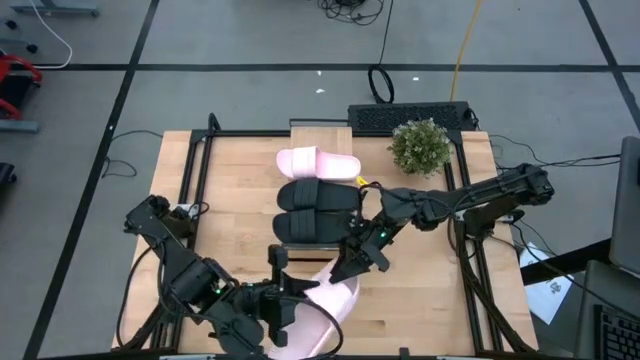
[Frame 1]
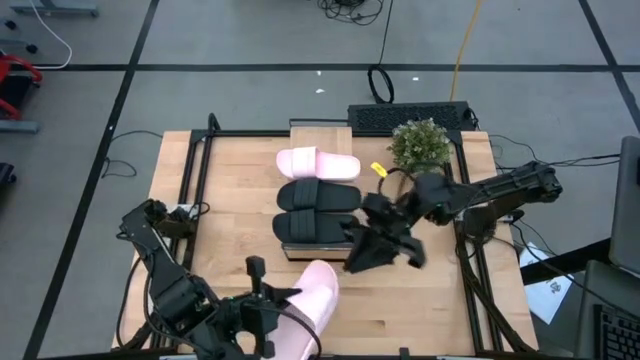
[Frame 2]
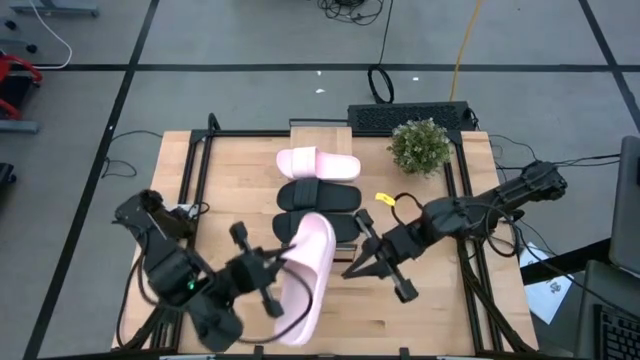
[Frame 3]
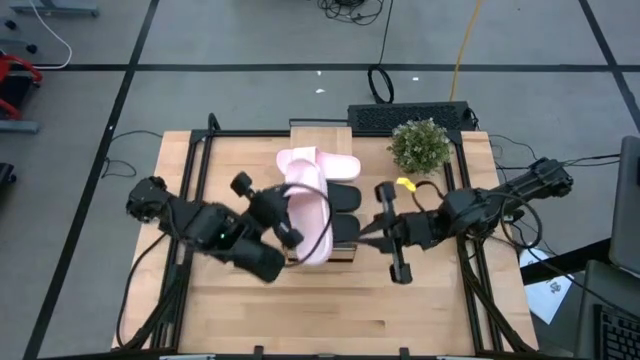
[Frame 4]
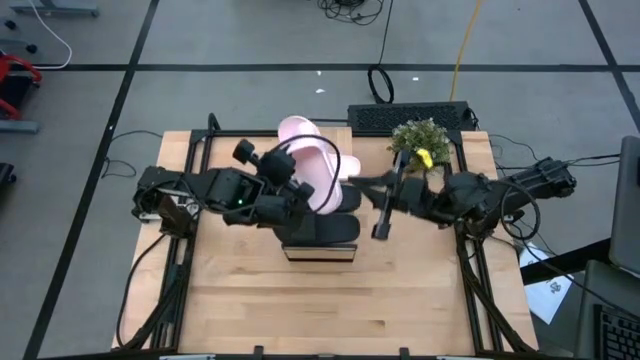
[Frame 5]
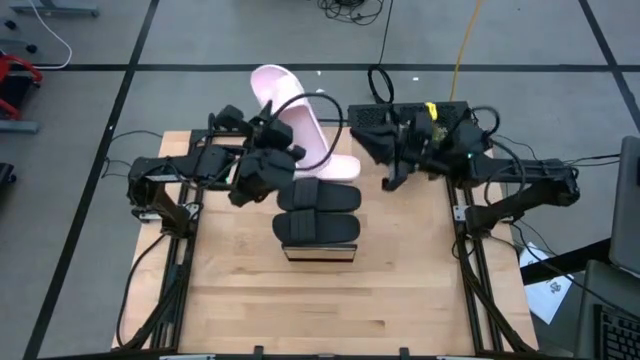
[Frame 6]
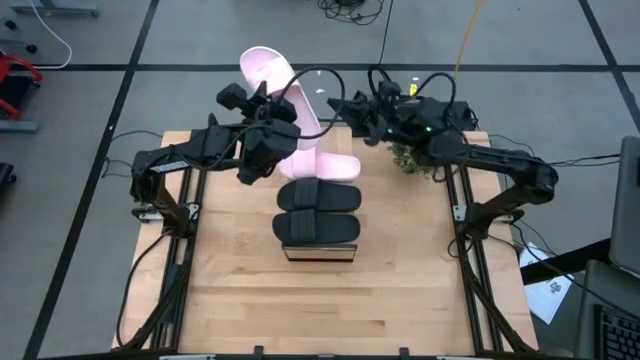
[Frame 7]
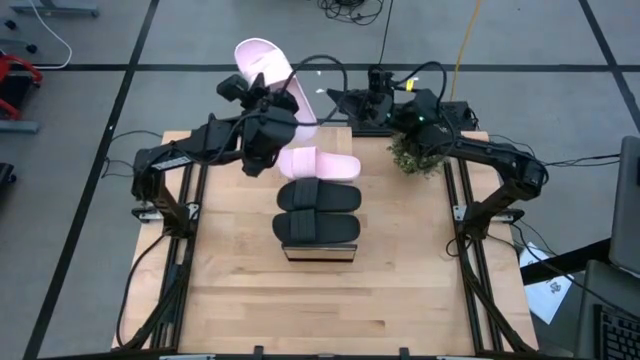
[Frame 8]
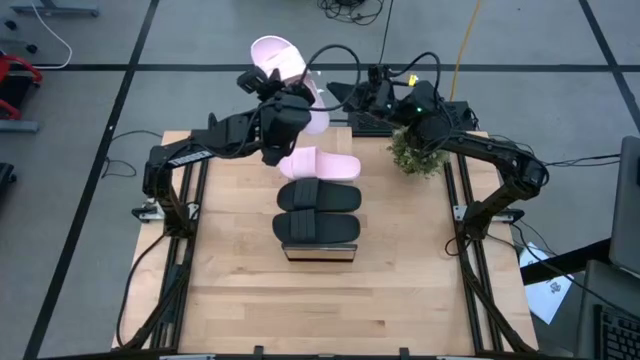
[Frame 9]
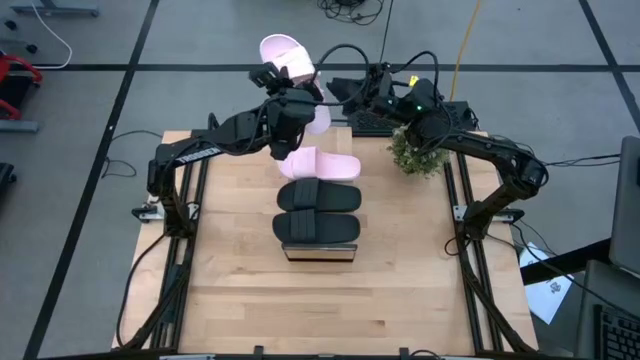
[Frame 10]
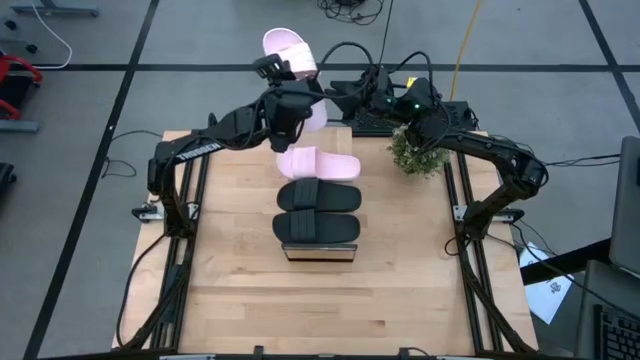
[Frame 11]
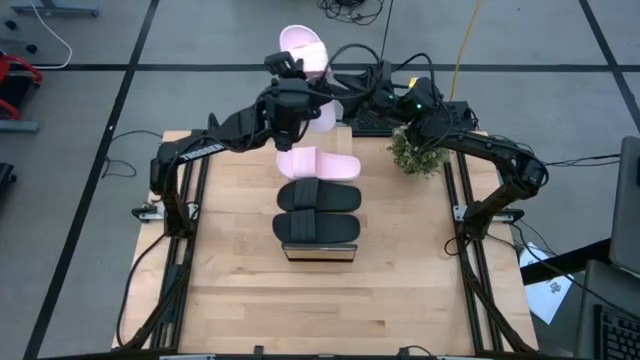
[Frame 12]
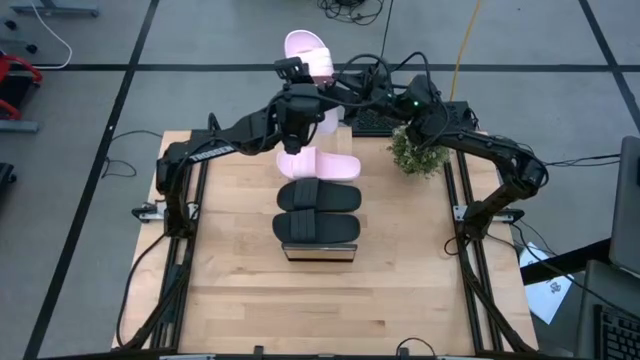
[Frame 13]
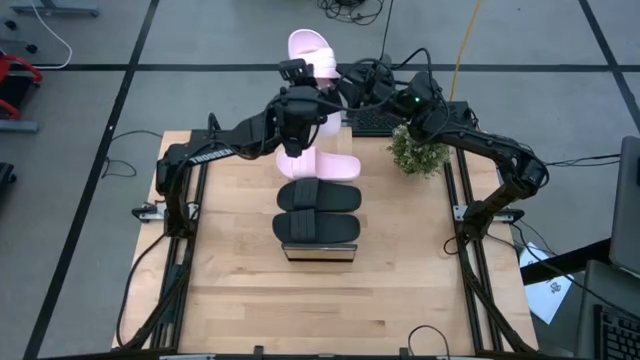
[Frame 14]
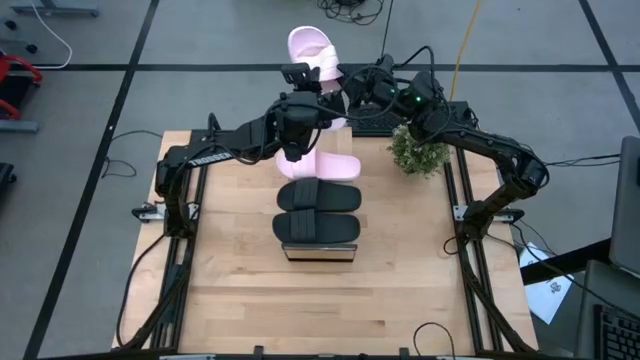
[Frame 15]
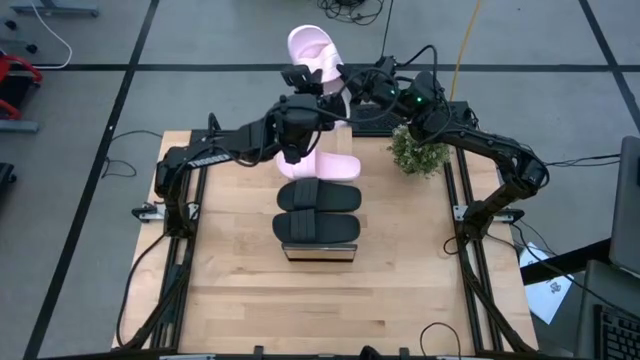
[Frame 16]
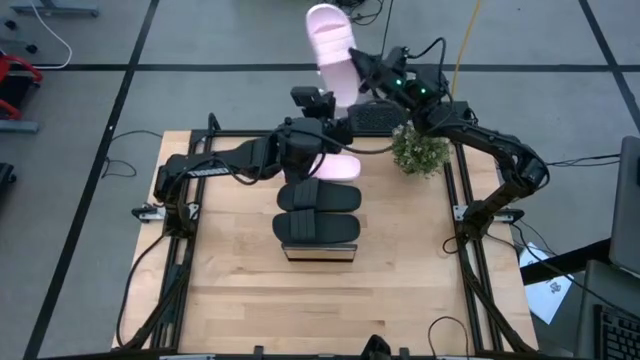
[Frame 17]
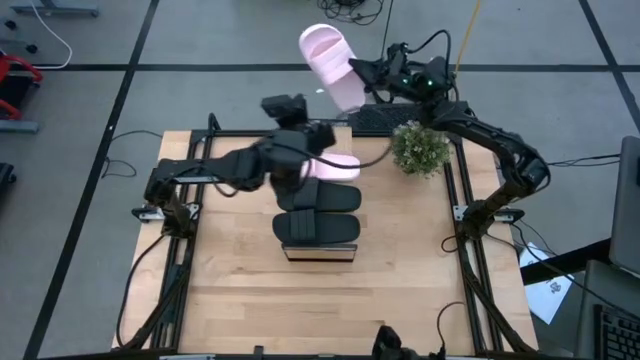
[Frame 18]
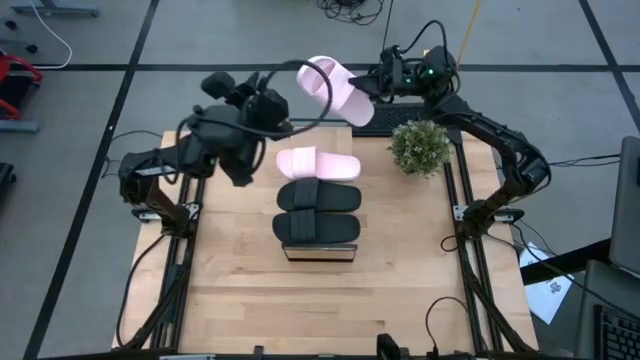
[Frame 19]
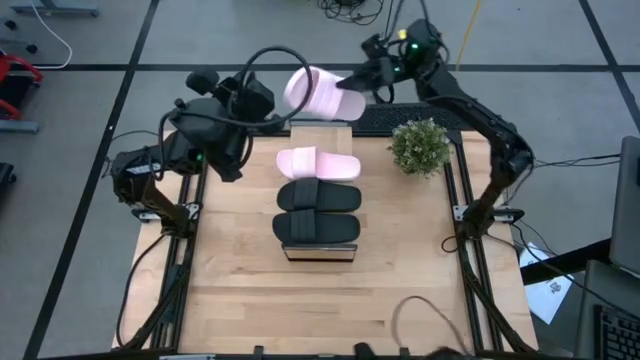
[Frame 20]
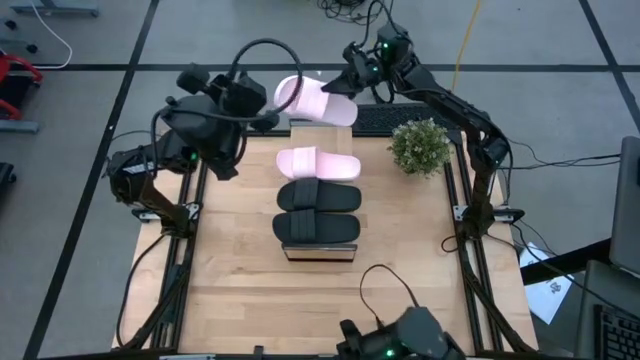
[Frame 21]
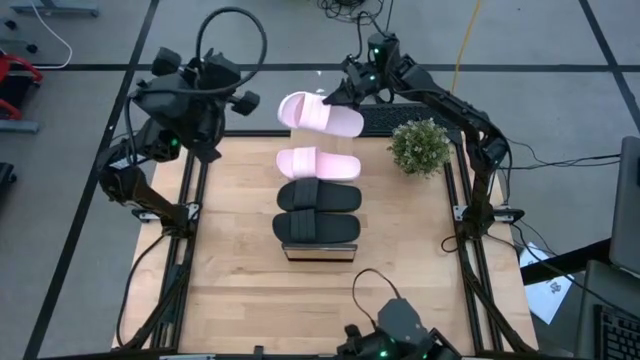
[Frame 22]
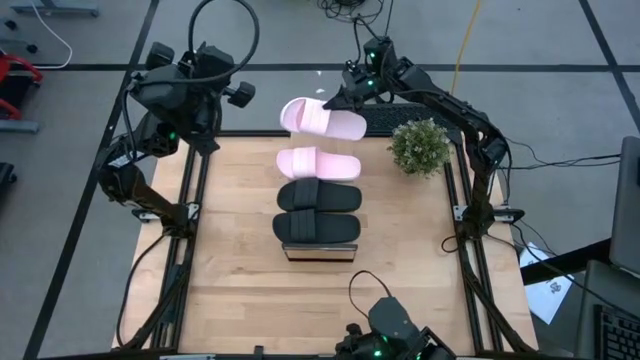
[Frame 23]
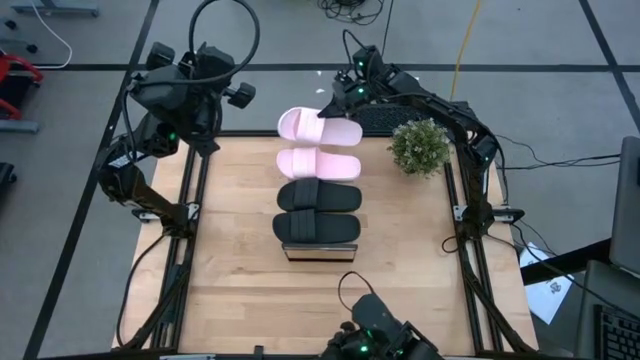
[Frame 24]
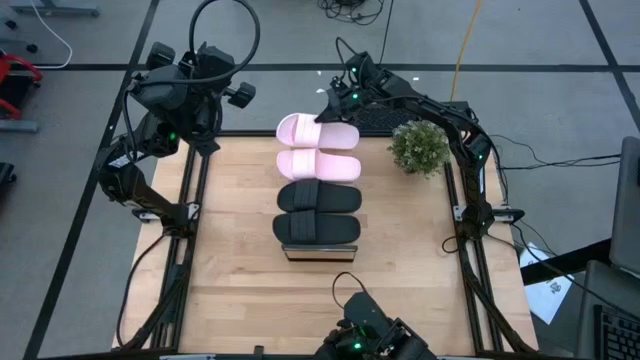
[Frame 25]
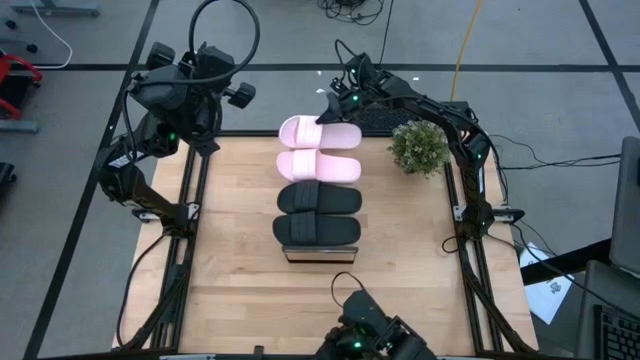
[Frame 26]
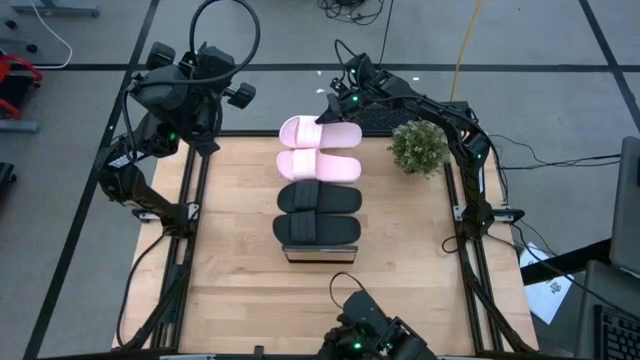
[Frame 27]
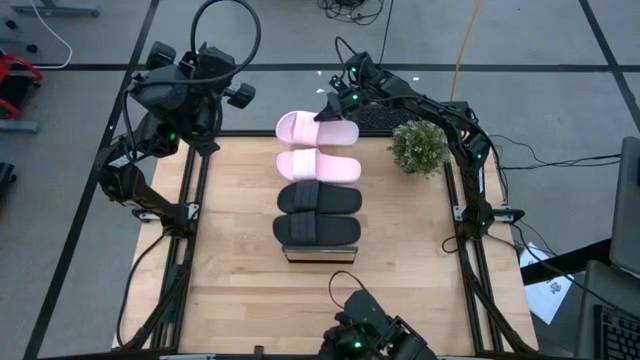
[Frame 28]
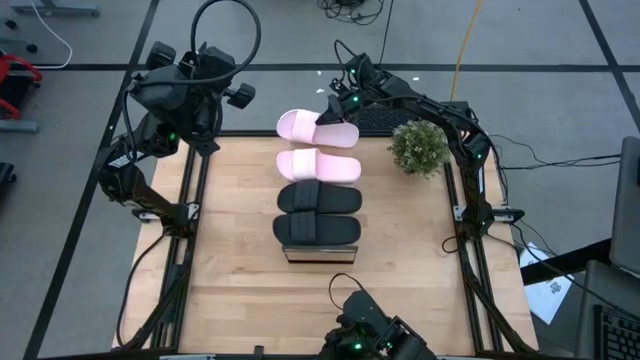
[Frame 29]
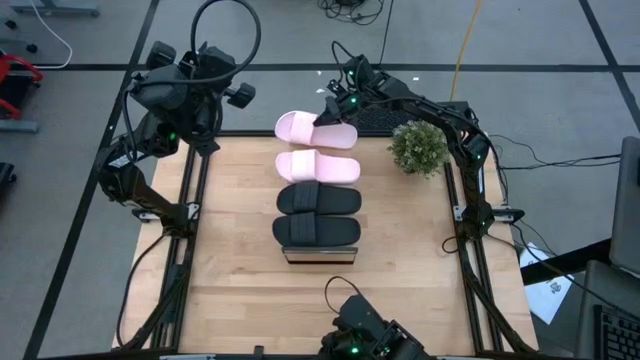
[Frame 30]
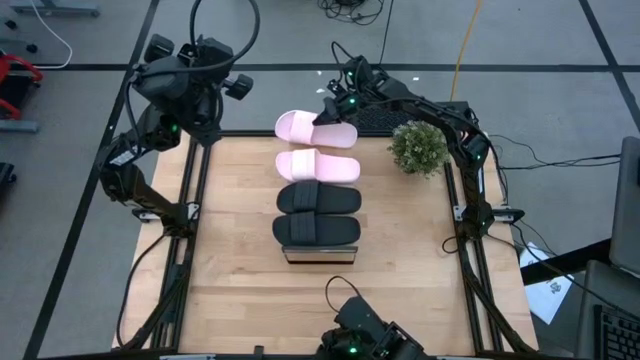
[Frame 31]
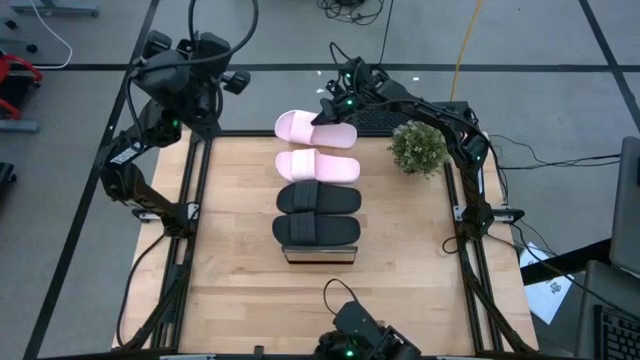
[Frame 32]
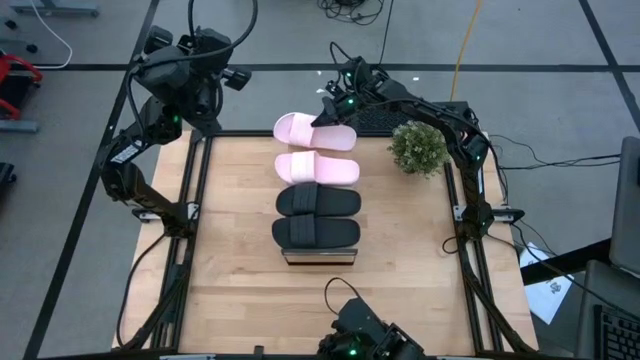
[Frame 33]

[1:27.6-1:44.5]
Task: Pick and place slides into the shelf
Put the pink slide on the shelf

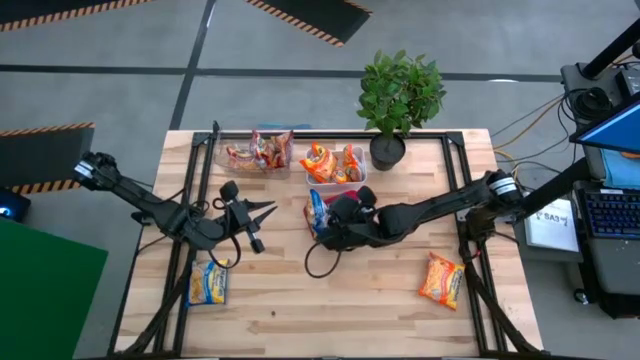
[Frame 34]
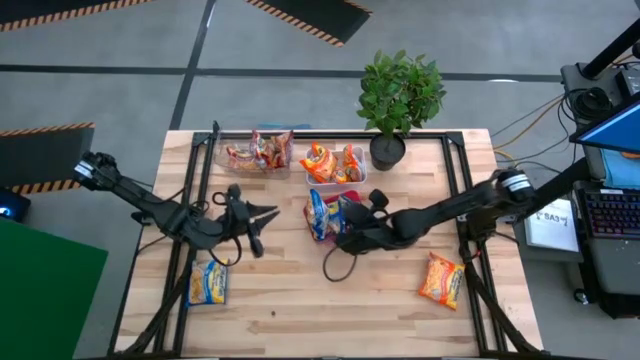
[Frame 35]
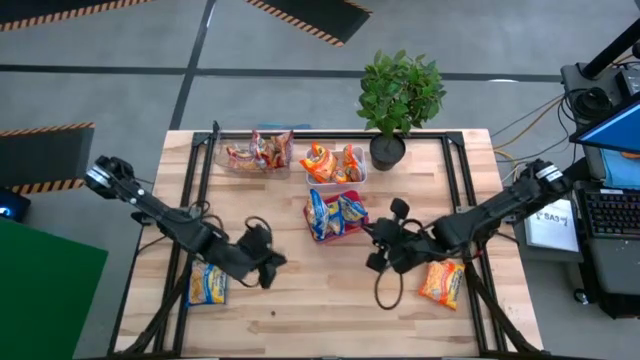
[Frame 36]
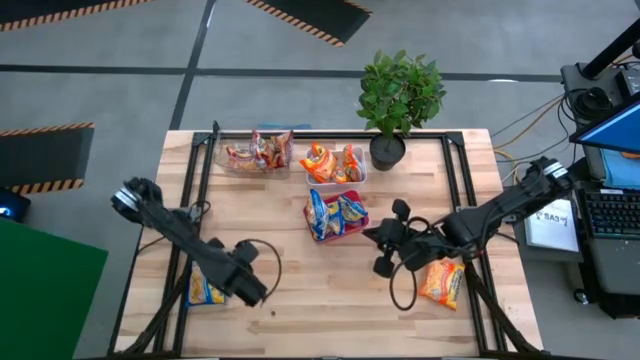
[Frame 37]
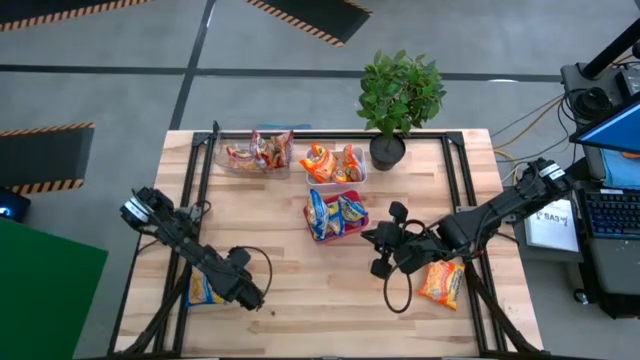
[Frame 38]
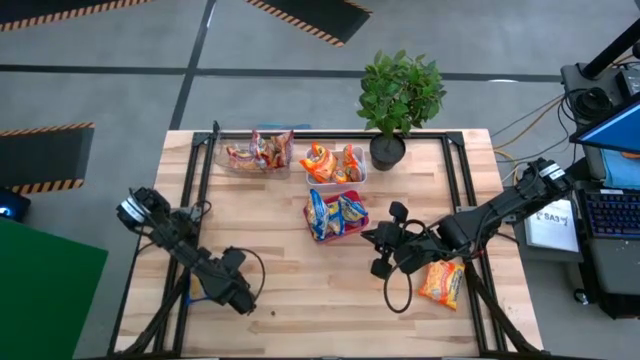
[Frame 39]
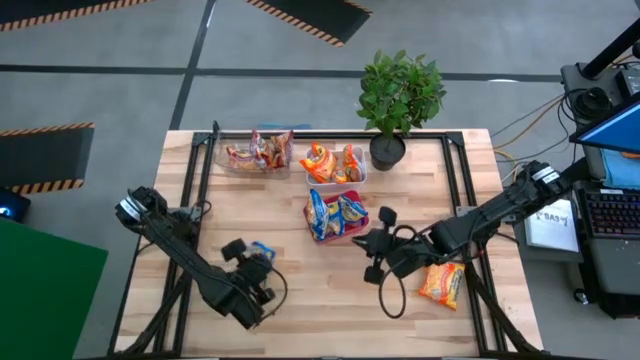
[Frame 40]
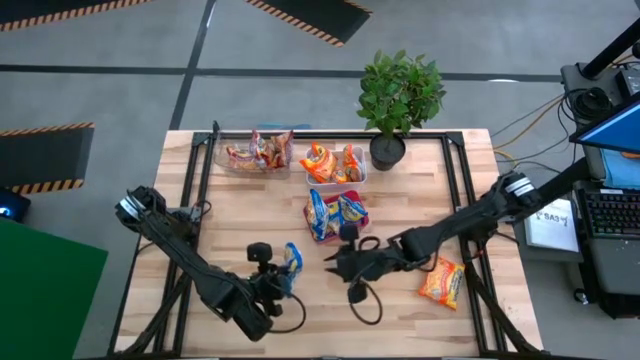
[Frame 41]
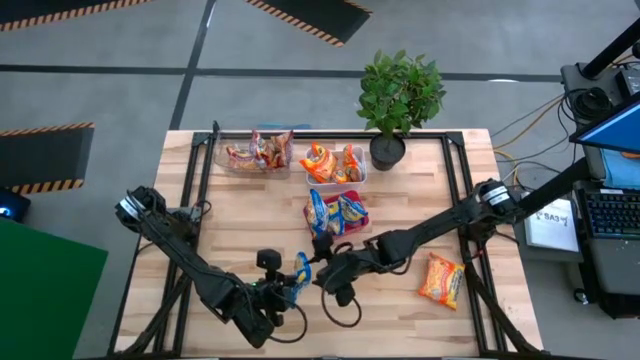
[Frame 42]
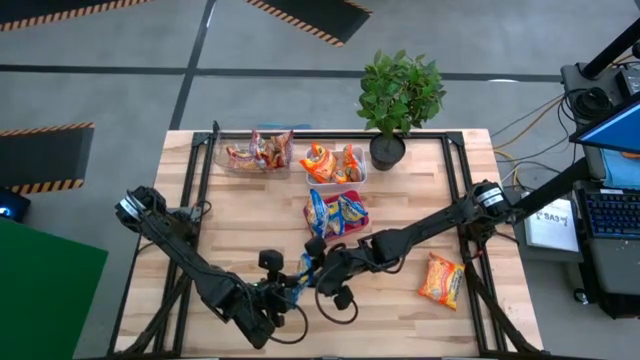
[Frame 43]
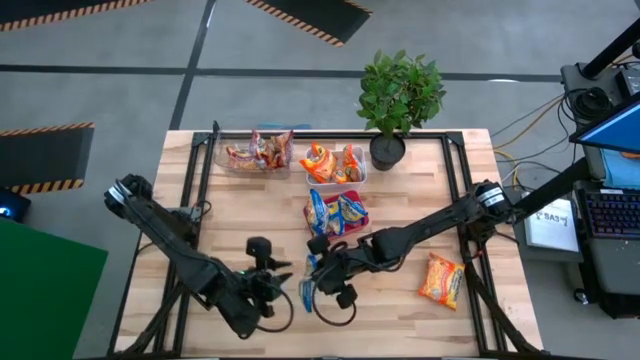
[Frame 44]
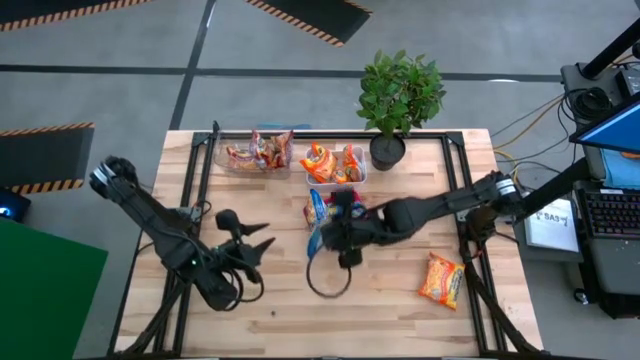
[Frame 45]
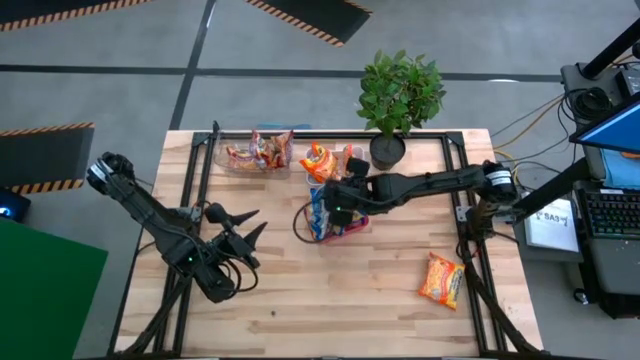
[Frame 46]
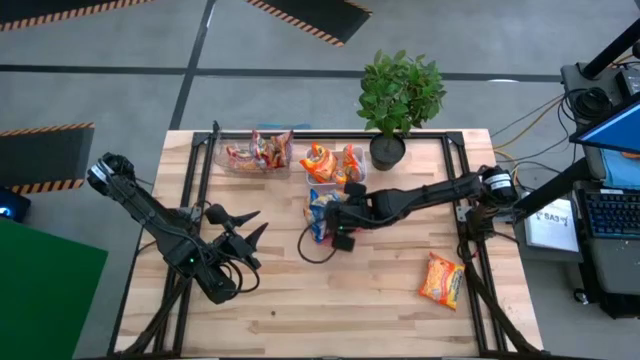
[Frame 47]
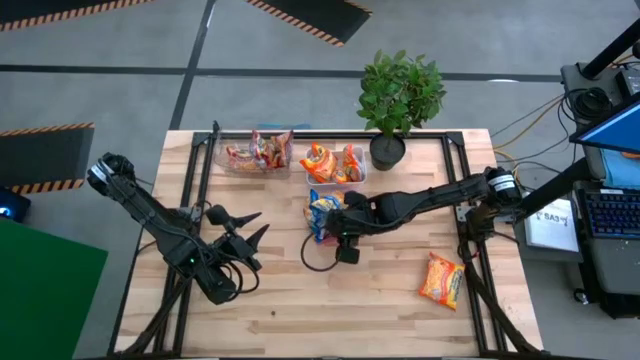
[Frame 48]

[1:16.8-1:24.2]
Task: Sort Maruchan noodles
Put the blue noodle pack into the red bin
